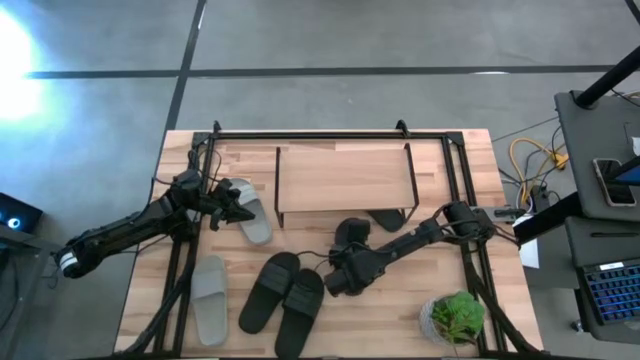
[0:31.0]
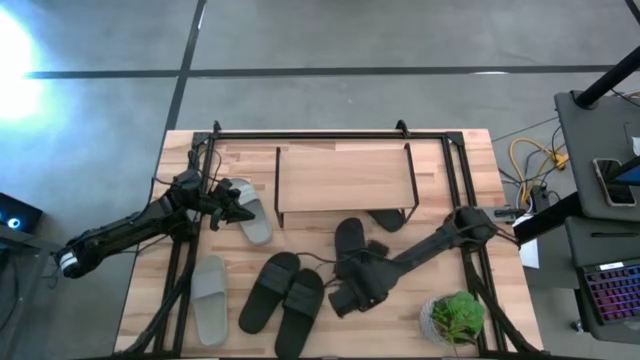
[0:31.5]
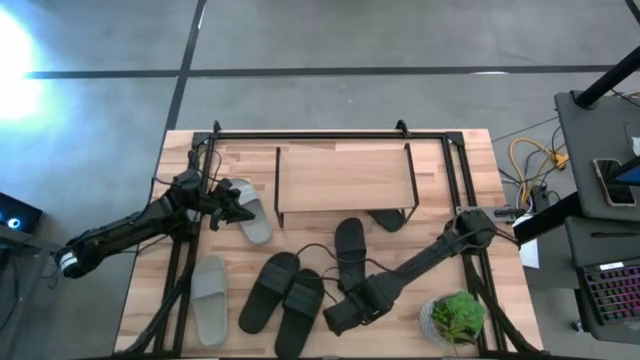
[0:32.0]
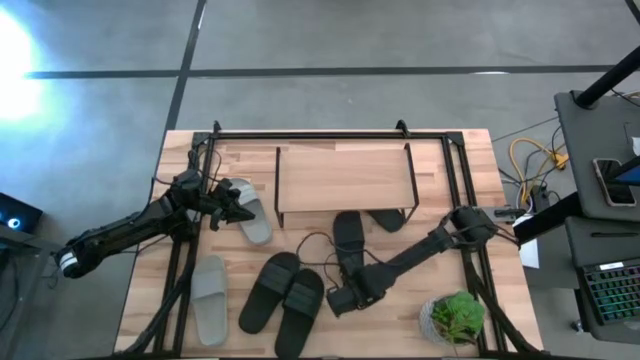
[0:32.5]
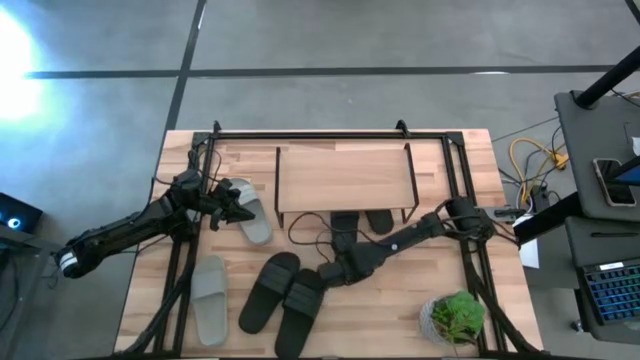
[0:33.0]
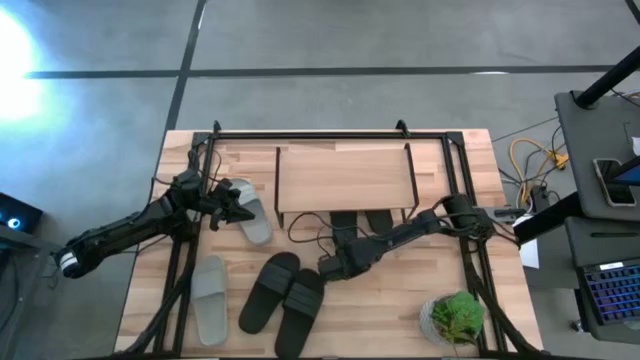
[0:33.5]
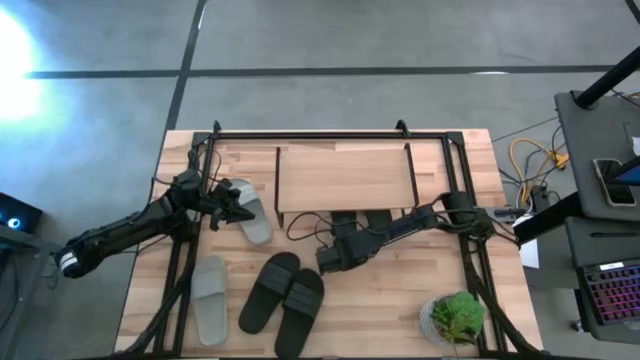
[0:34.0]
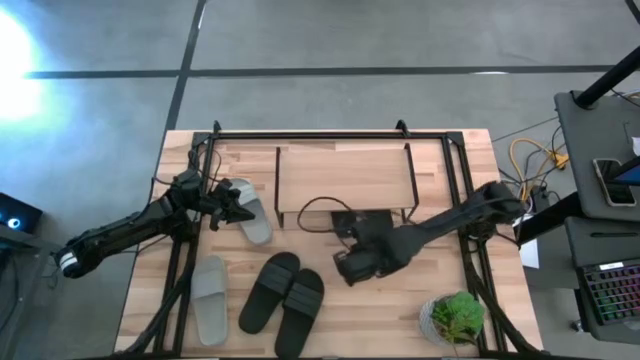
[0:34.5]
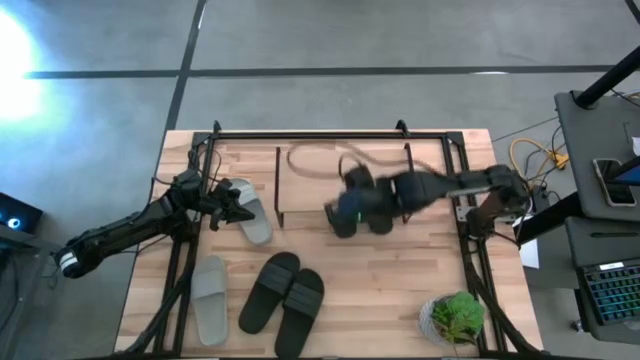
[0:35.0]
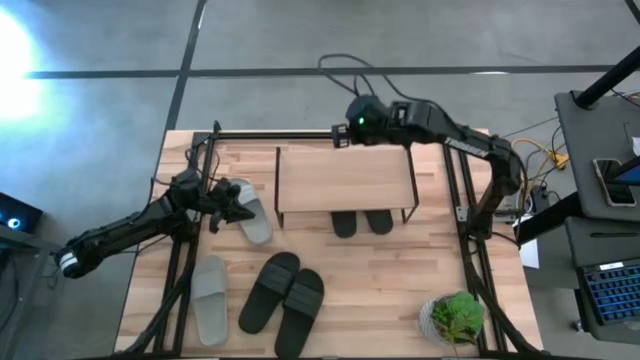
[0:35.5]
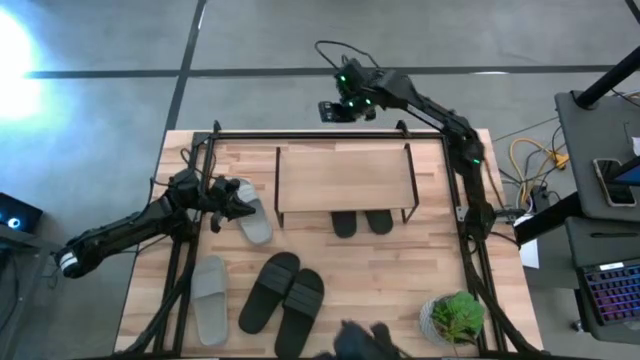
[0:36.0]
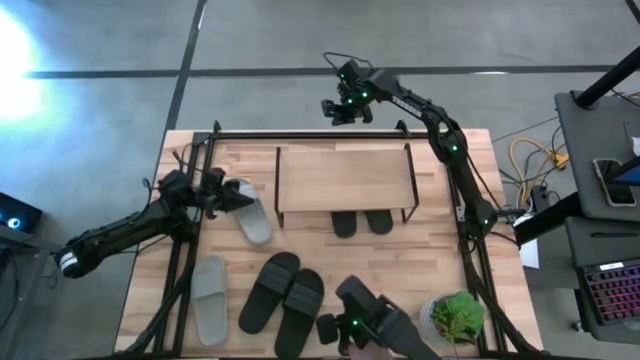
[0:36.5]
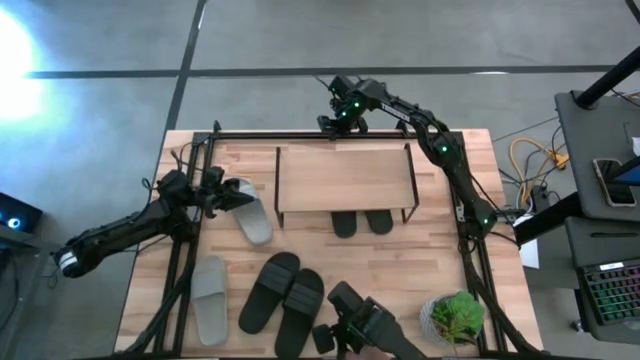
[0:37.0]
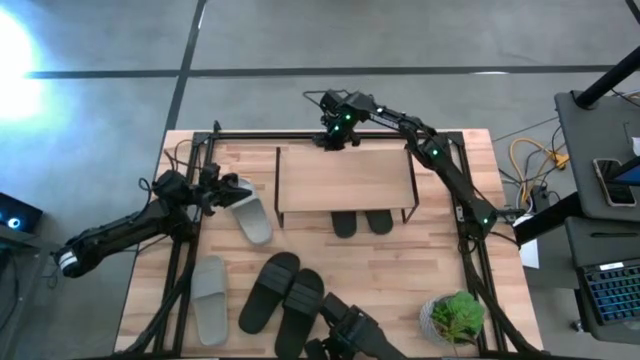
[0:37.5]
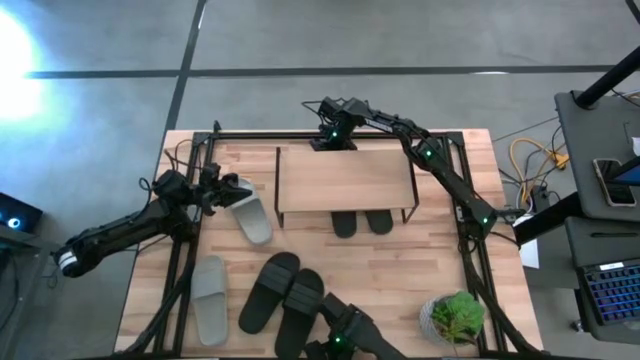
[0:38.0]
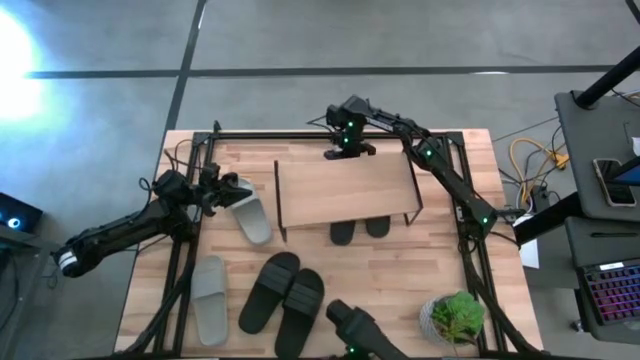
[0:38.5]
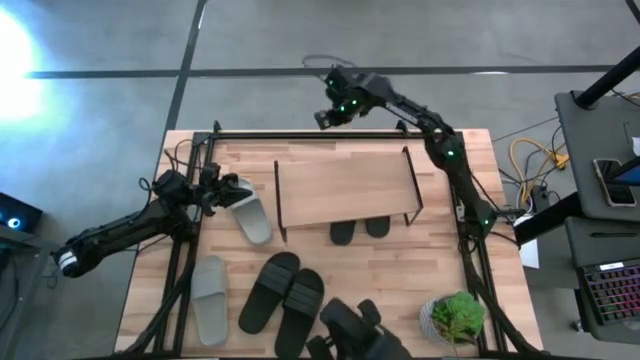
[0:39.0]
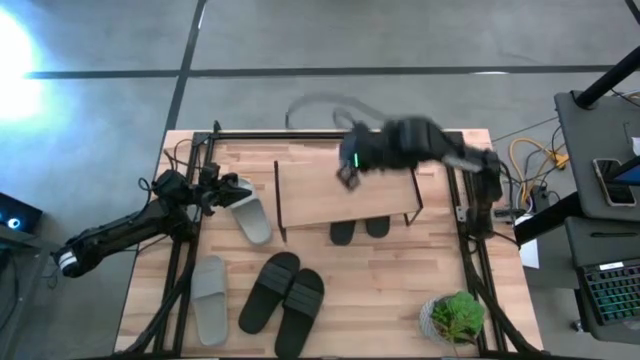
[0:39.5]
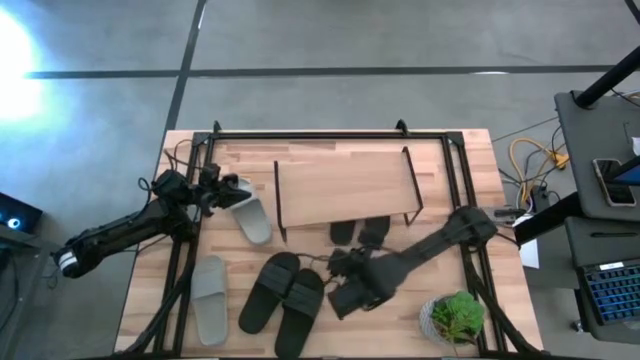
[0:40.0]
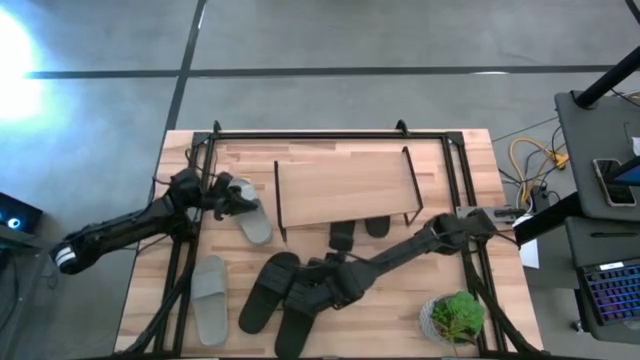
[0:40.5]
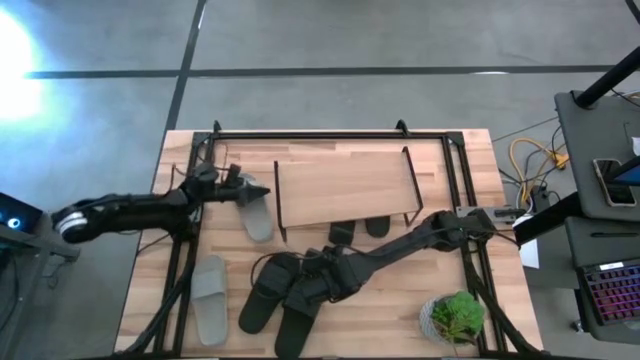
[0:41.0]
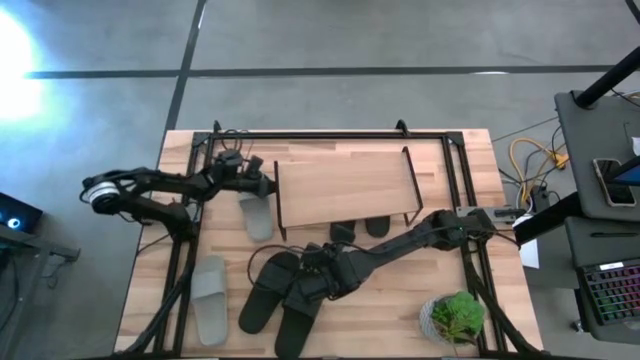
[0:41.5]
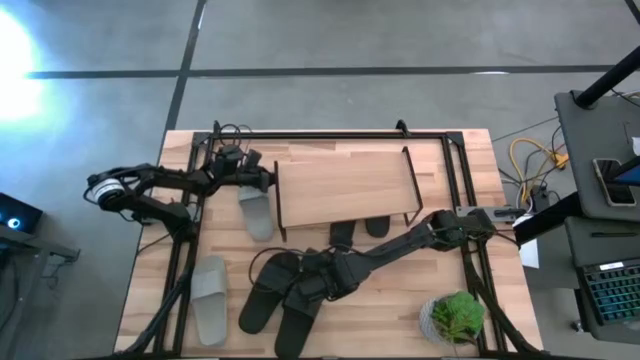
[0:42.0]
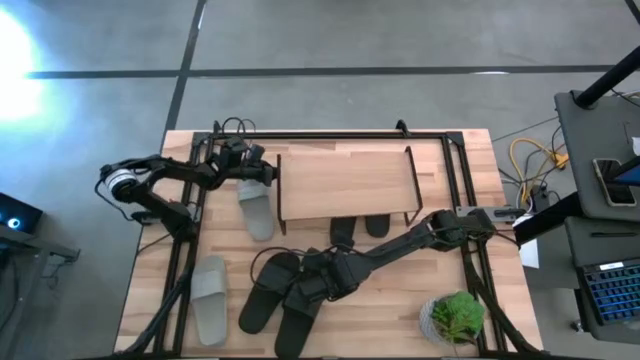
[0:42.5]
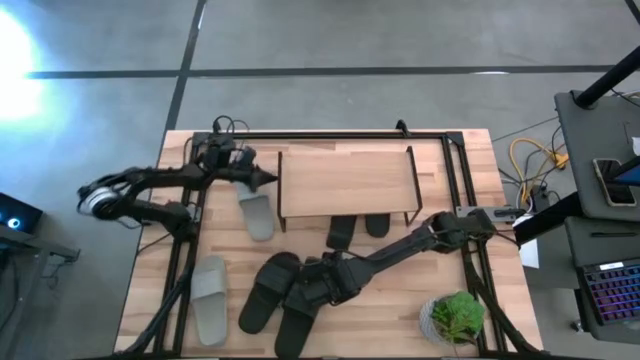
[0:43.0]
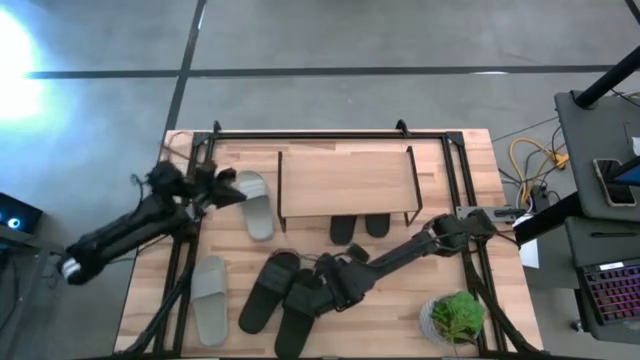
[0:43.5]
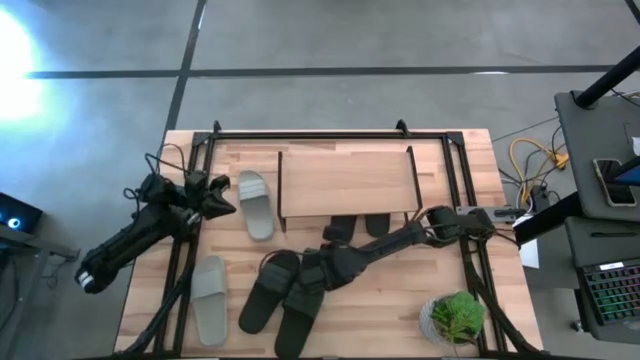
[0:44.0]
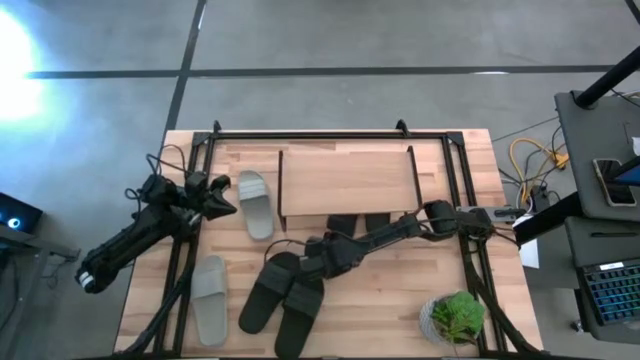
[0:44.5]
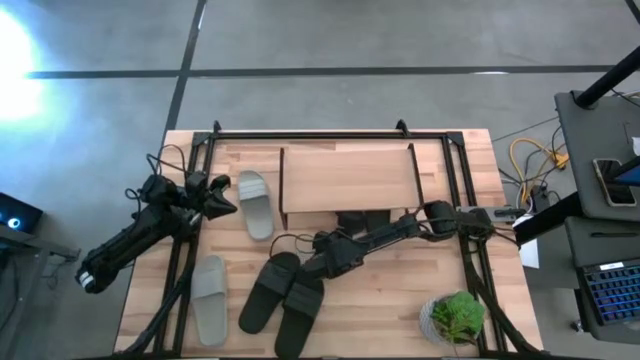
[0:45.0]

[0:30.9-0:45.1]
Task: Pick and place slides into the shelf
Put the black slipper under the shelf

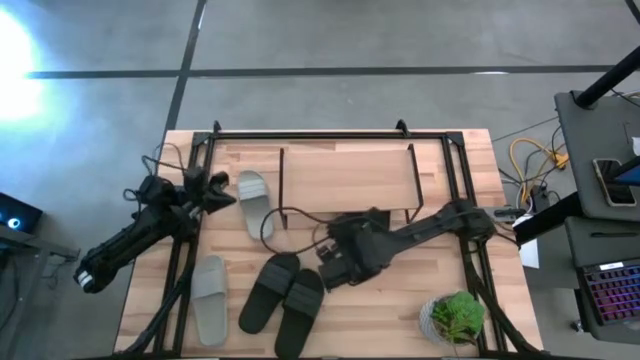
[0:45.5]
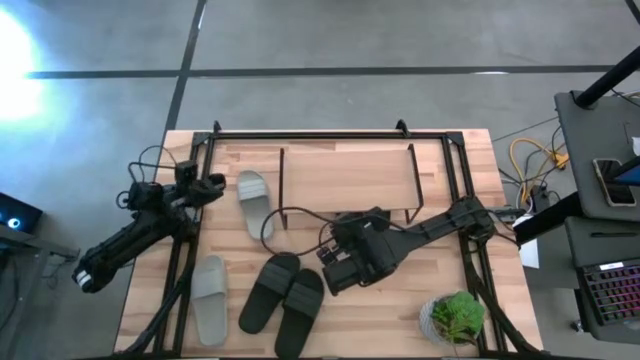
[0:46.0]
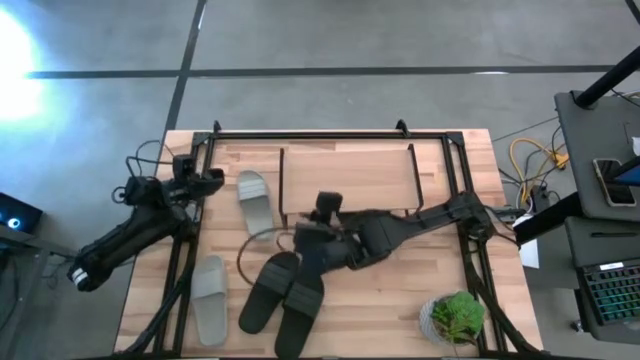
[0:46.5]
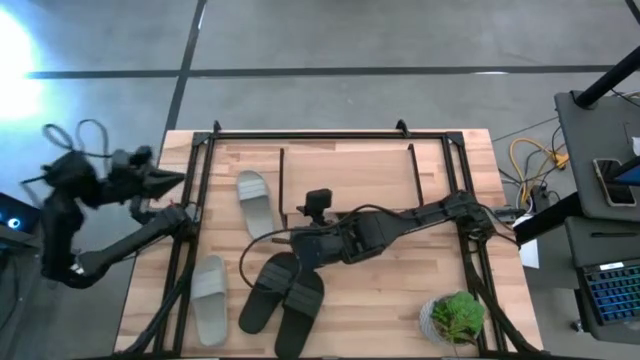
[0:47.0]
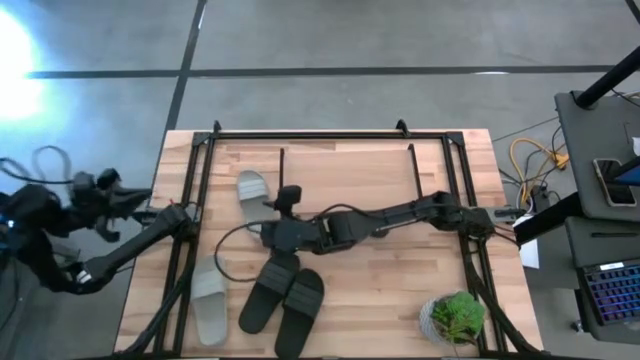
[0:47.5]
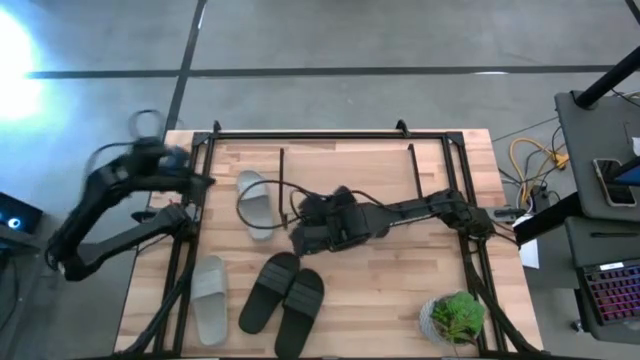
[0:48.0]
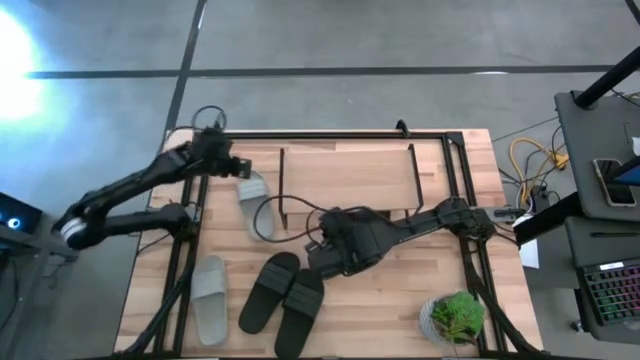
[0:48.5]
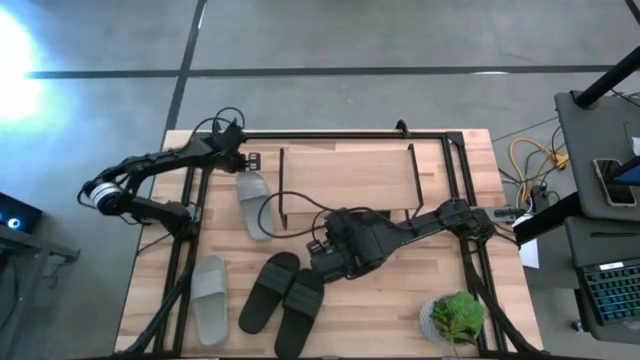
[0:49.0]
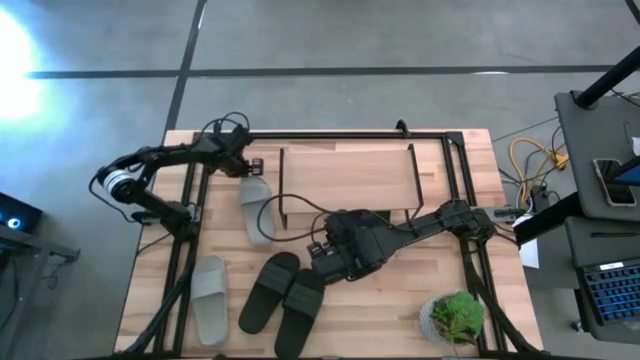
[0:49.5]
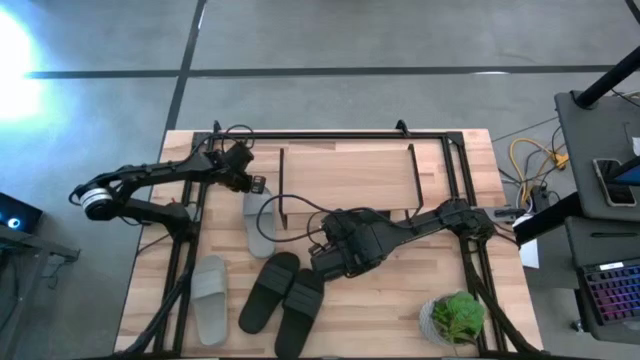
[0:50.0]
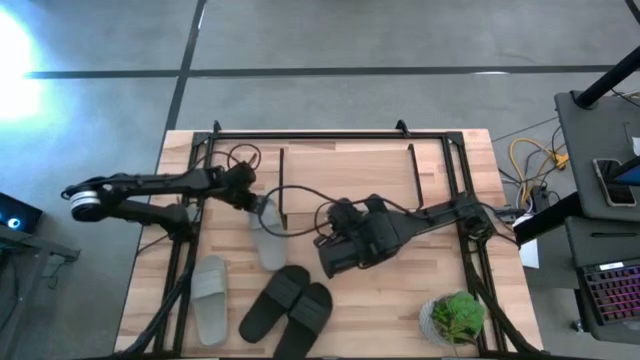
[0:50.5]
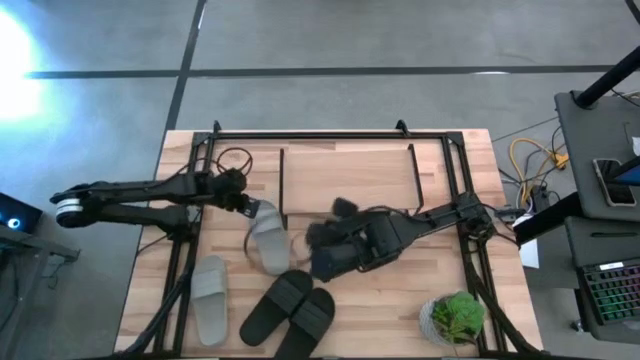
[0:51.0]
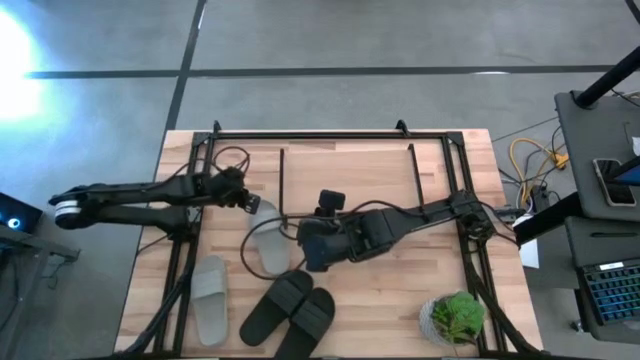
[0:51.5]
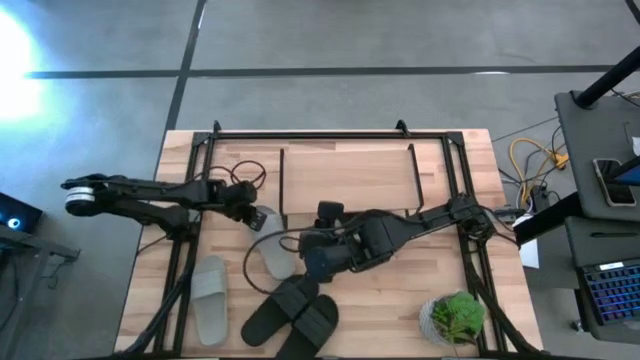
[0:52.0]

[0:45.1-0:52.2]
Move the gray slipper to the middle left of the table

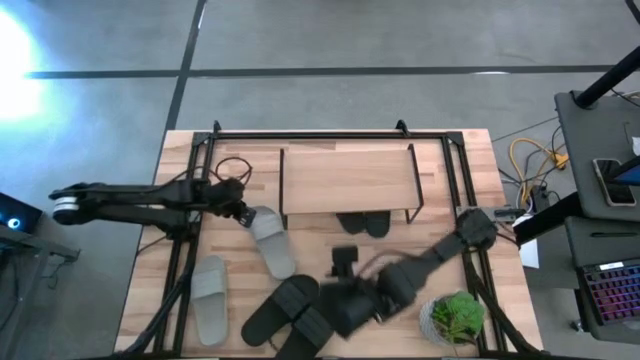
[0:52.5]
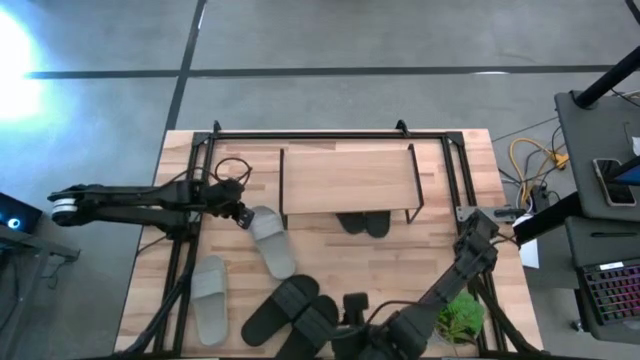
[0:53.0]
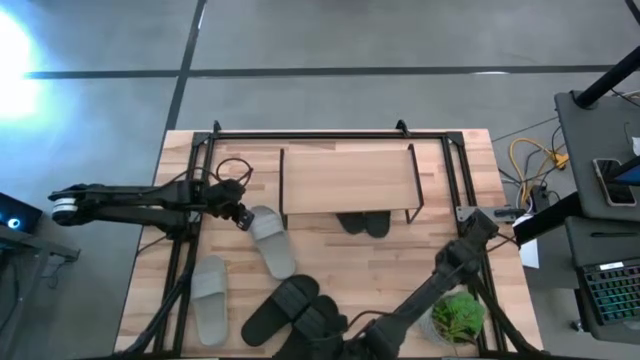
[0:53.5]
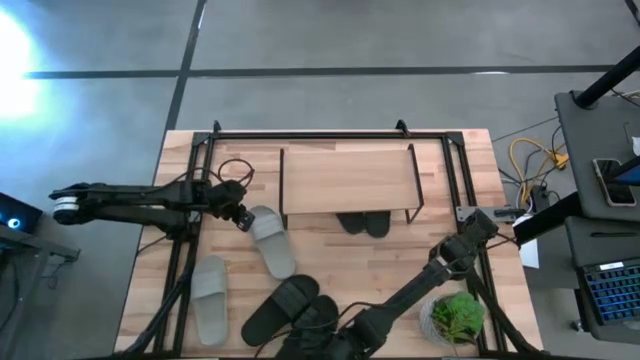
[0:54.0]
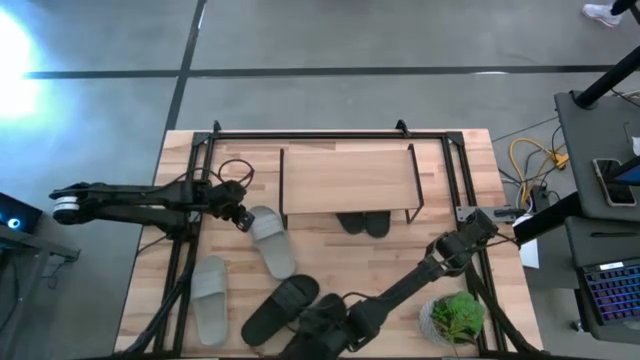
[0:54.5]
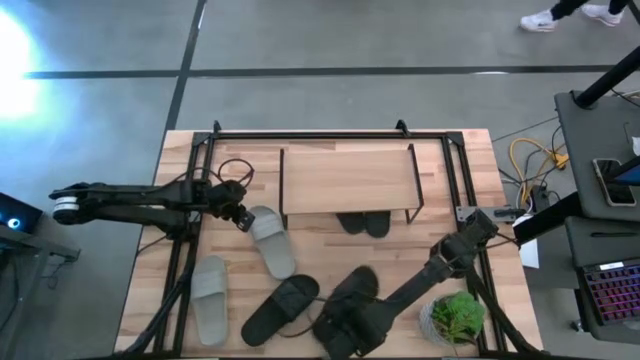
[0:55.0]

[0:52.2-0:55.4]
Adjust the black slipper on the table
